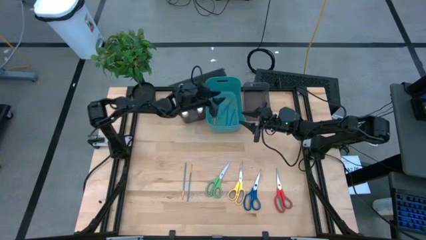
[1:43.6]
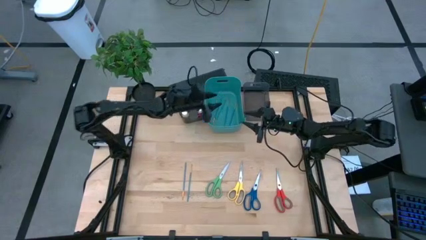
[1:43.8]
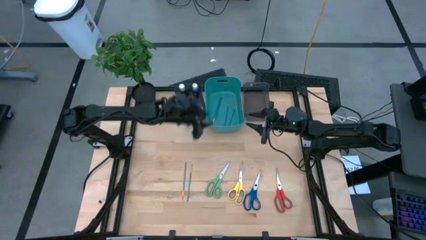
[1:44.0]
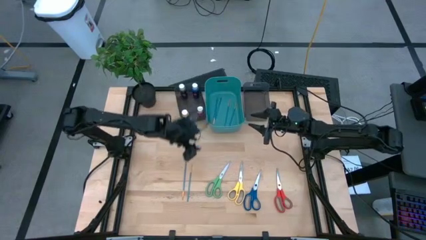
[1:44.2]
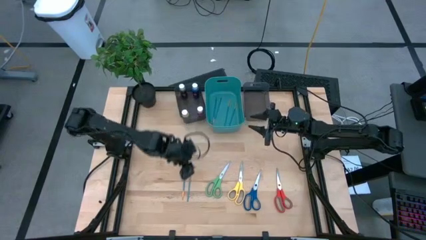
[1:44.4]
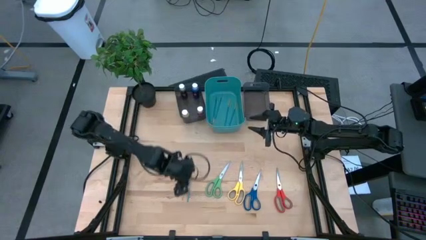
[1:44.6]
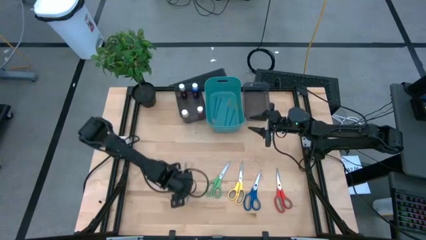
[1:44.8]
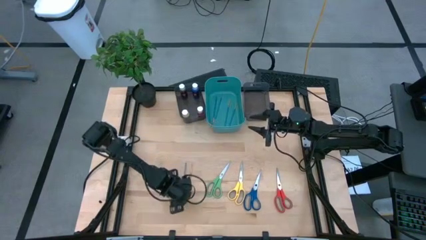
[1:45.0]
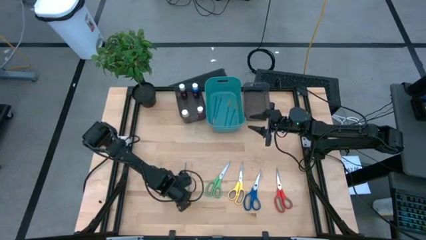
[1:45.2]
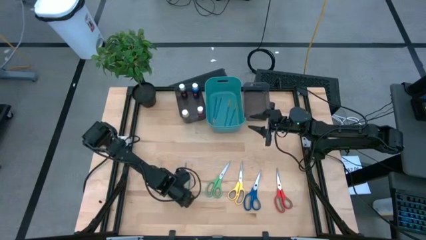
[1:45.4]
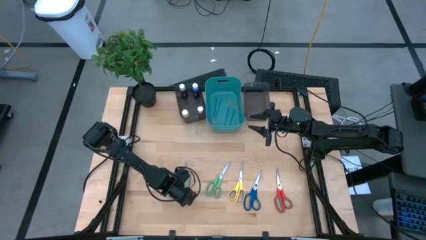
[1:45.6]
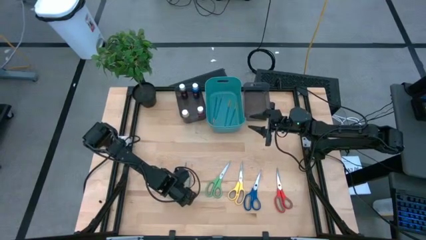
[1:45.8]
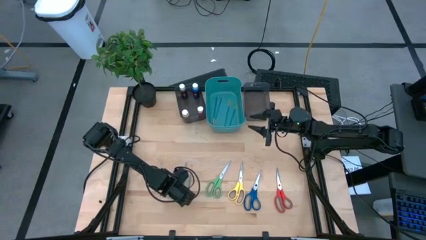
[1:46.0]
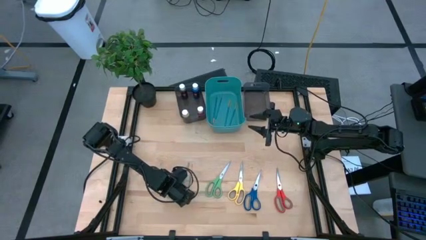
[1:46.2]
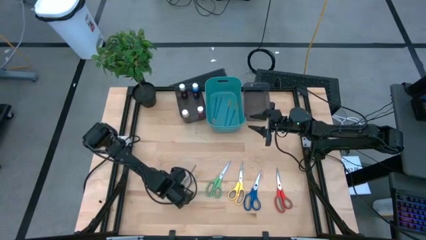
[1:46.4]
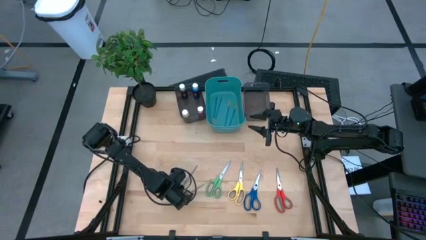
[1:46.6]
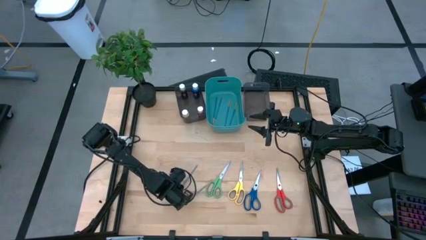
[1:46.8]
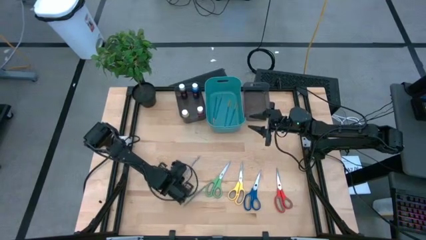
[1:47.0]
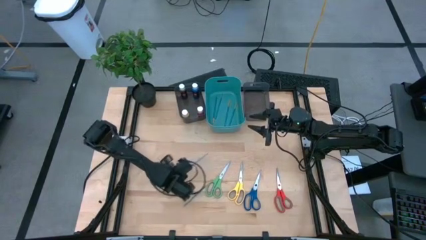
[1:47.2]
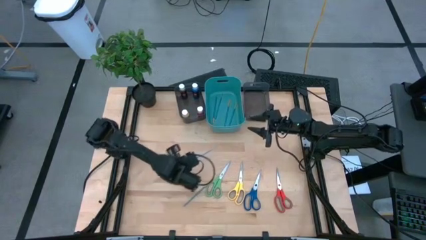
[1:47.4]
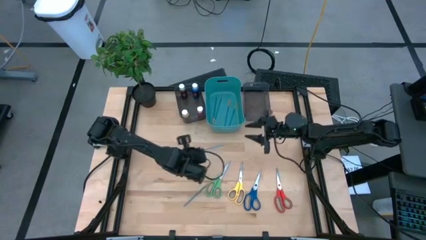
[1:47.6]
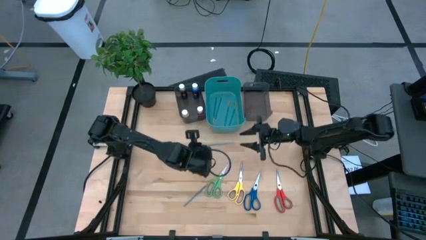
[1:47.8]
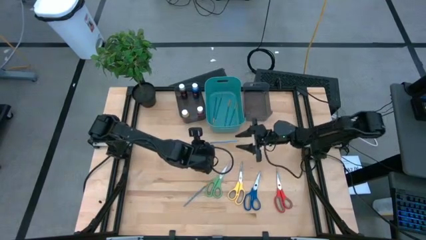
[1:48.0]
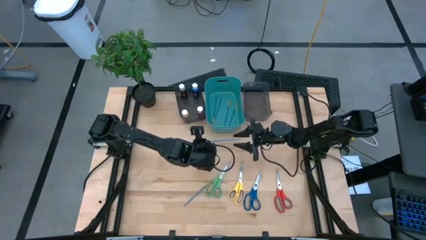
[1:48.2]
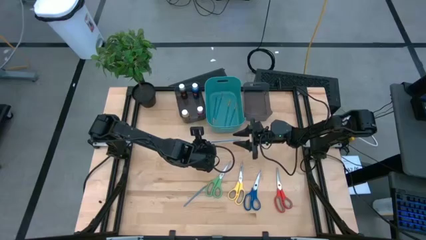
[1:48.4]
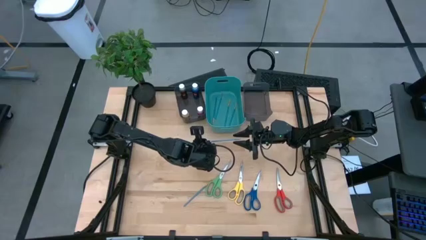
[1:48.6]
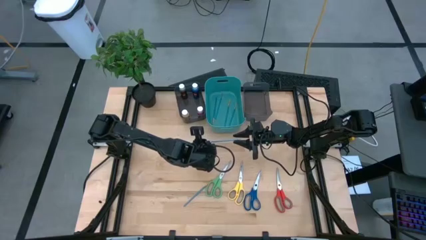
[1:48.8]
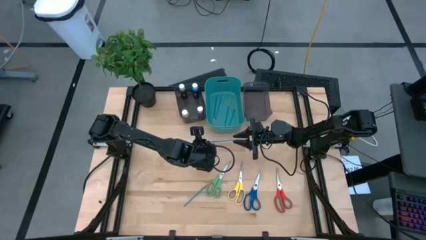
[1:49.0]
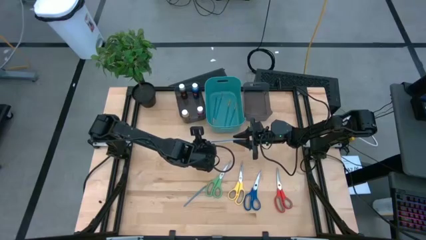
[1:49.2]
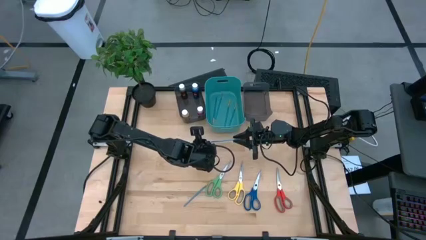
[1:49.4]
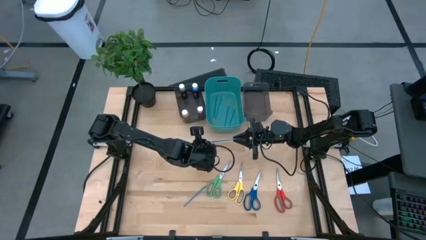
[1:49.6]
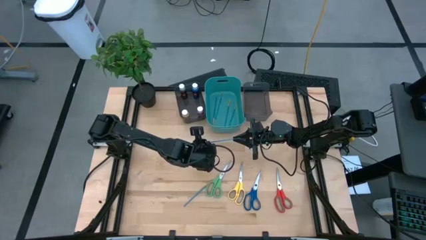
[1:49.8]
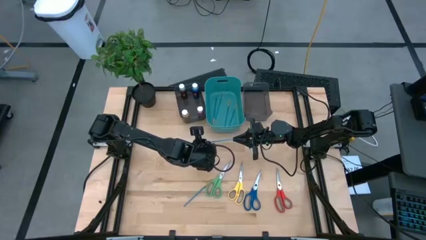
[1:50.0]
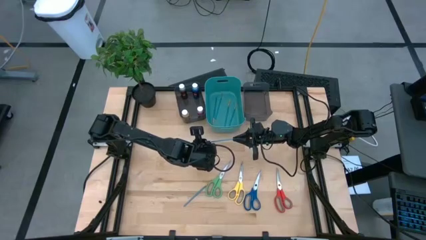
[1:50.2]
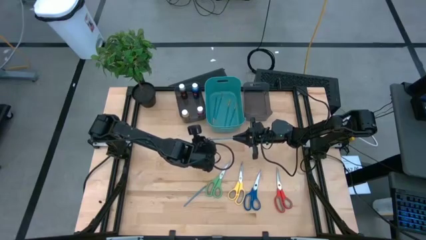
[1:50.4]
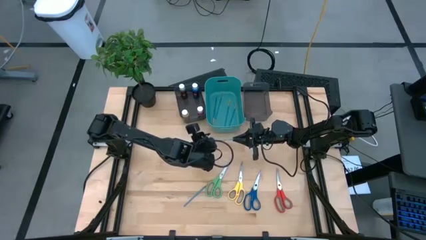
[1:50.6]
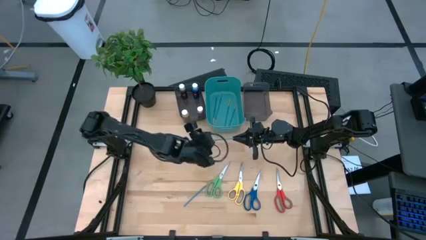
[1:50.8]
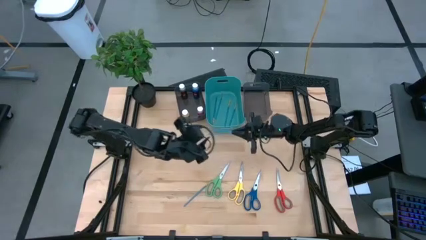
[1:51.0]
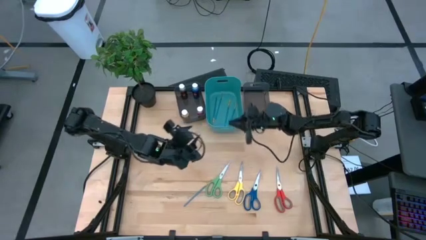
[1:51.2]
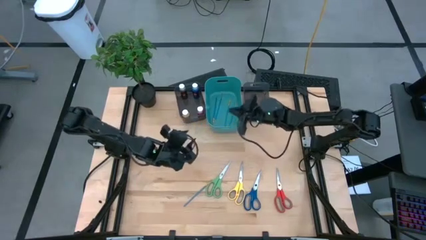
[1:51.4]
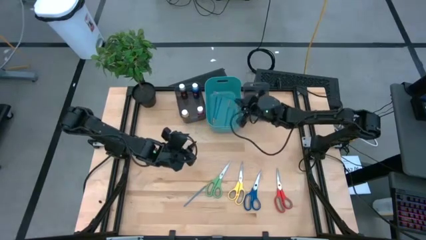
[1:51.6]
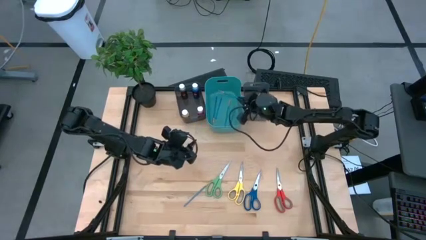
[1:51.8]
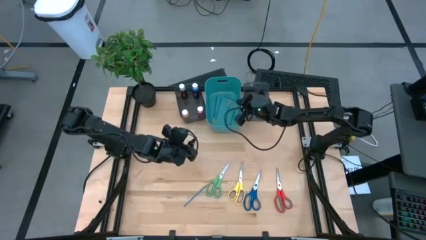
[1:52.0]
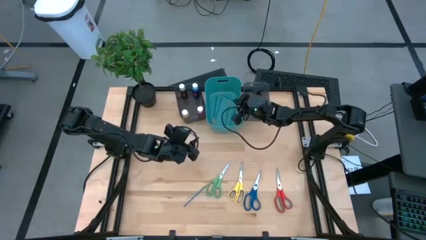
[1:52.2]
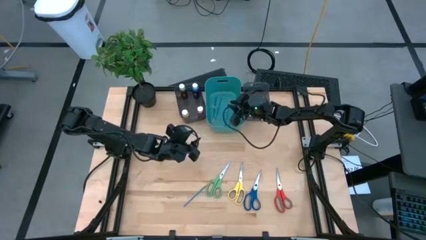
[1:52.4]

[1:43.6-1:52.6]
Task: Pick & Place Paint Supplies
Put the blue paint brush into the blue bin

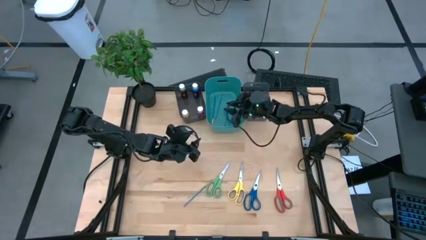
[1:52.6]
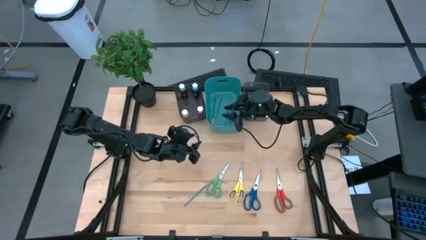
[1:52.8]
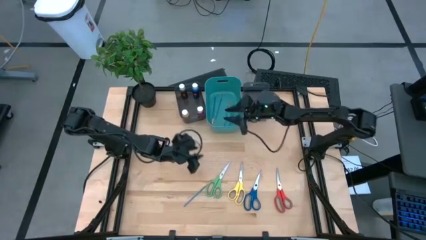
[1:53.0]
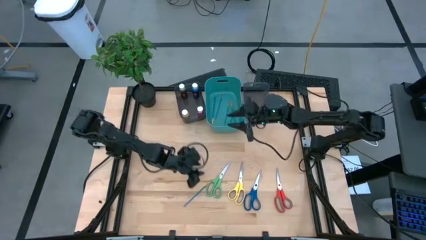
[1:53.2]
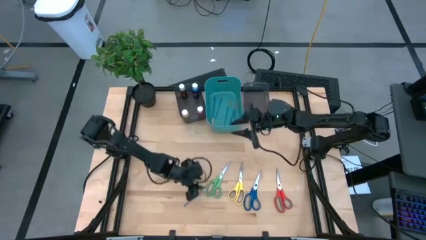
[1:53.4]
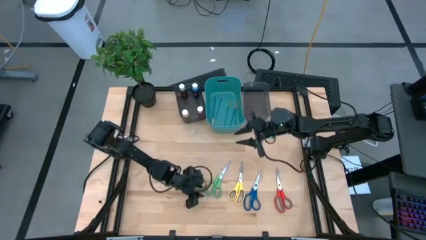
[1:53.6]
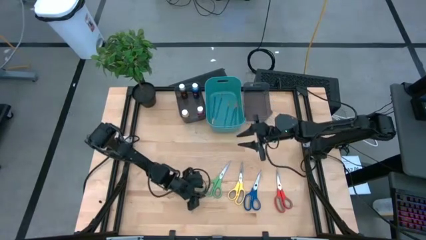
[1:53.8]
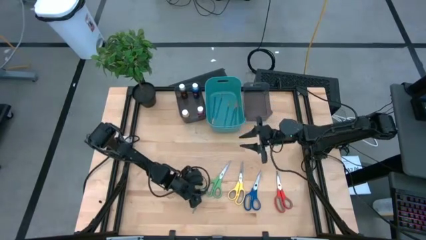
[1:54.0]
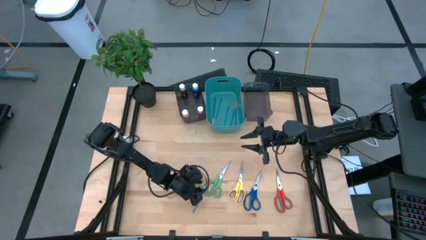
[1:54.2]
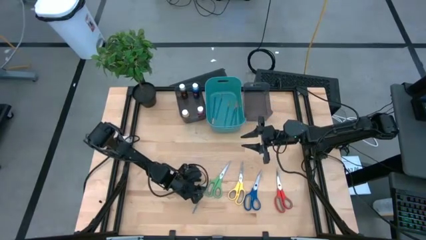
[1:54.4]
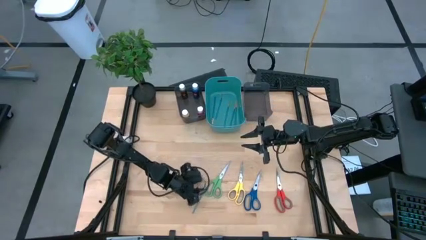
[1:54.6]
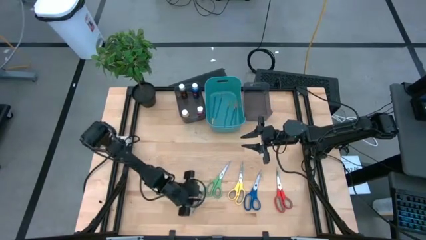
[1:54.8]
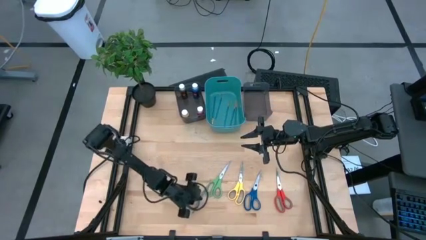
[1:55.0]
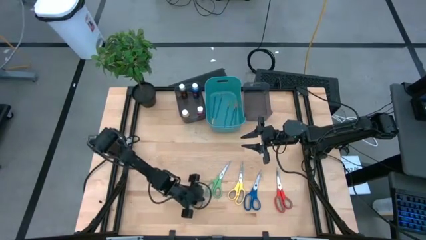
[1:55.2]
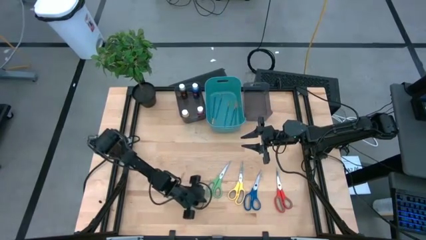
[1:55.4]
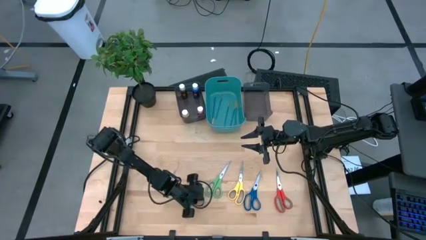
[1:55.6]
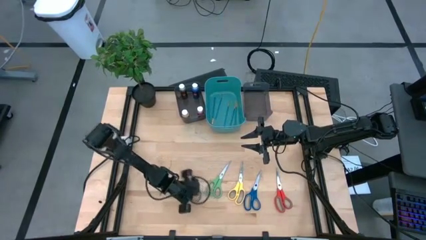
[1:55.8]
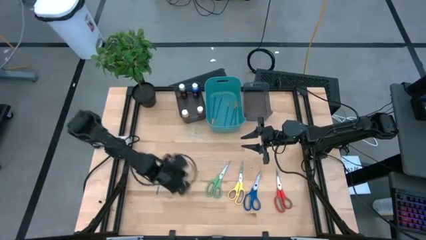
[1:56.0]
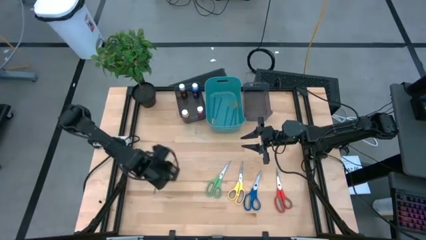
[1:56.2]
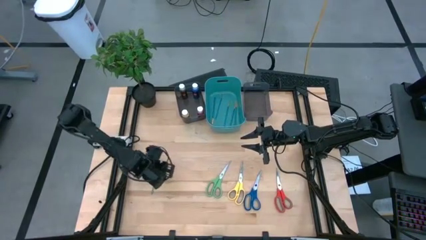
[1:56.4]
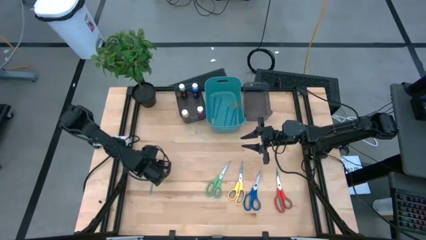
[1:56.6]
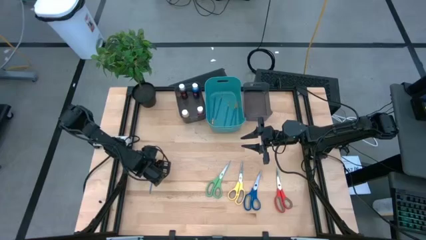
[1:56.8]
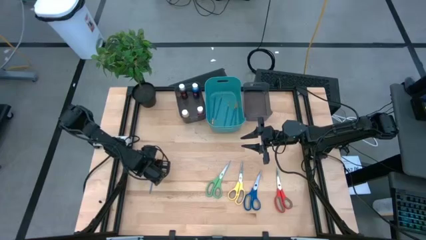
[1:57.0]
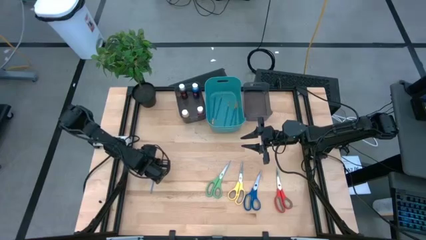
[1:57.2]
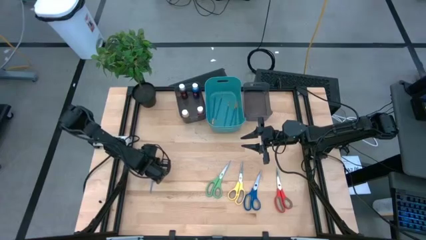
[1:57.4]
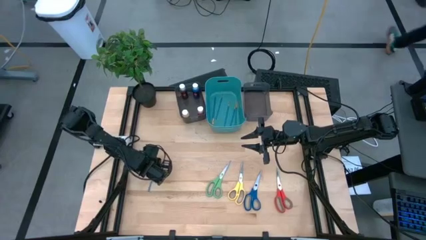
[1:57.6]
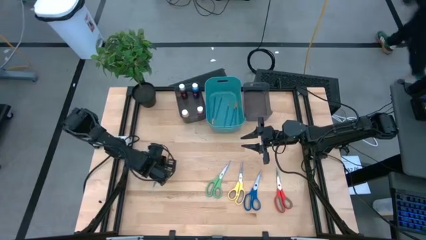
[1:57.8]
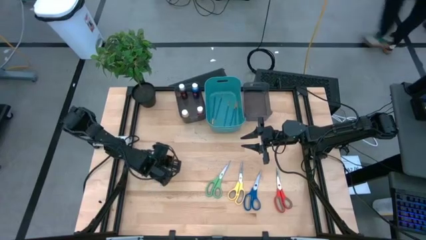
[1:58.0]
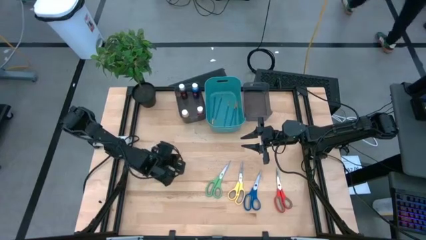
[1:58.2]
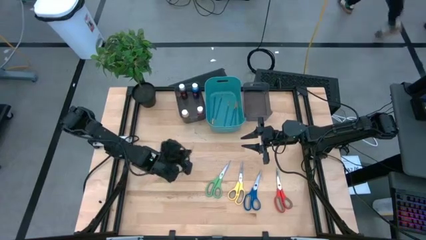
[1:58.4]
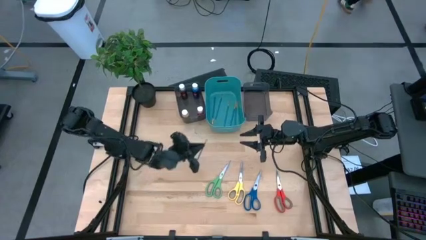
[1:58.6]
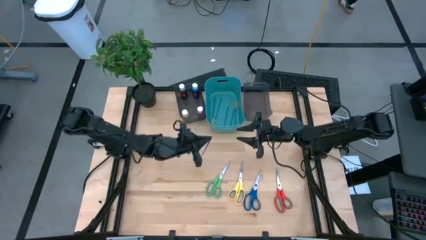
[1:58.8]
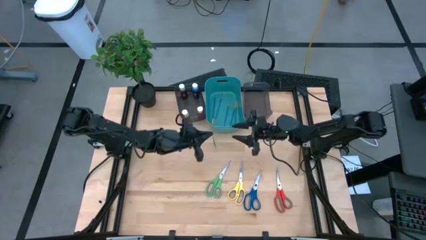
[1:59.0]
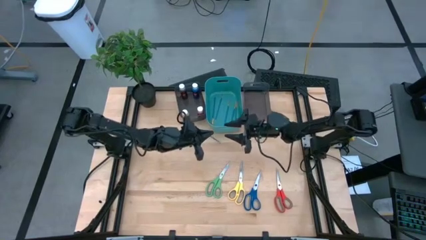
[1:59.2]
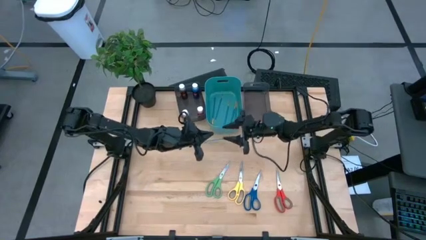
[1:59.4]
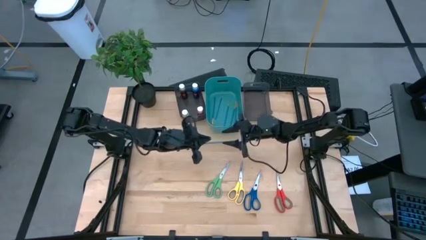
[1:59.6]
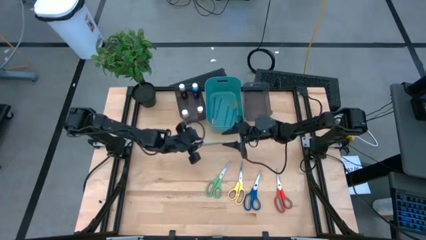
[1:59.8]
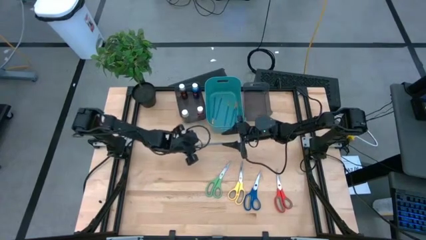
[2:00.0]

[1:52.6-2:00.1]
Put the blue paint brush into the blue bin
